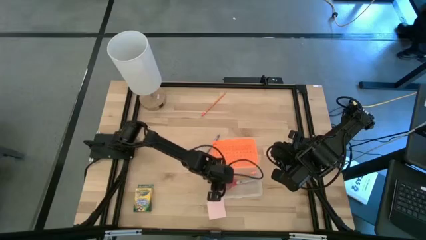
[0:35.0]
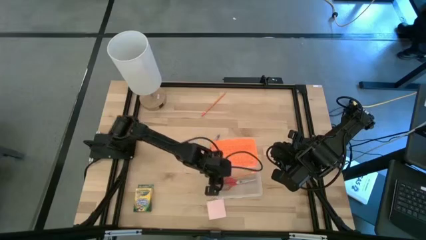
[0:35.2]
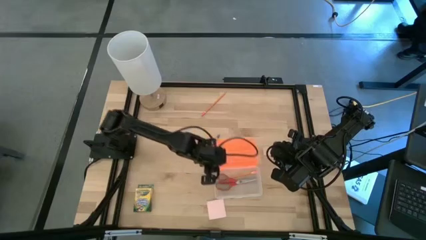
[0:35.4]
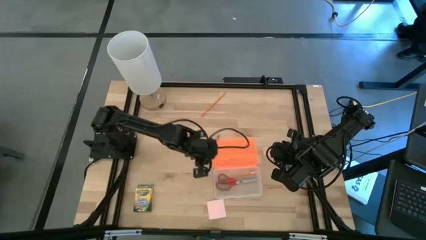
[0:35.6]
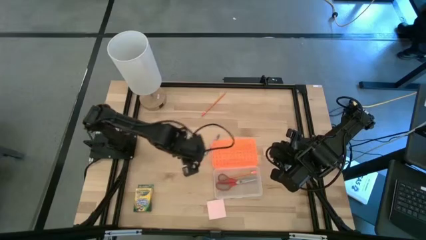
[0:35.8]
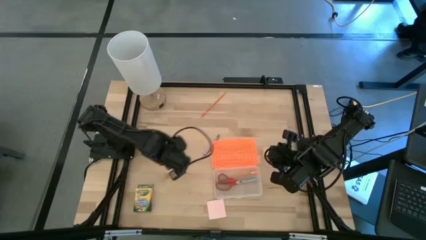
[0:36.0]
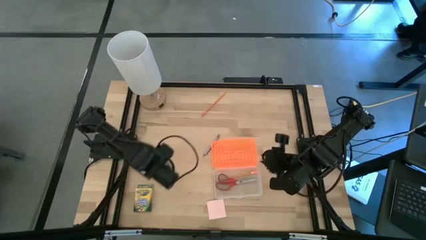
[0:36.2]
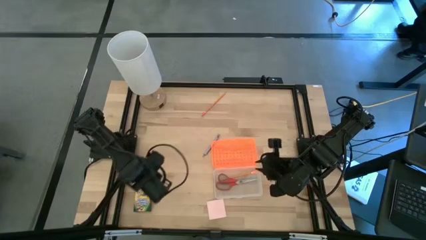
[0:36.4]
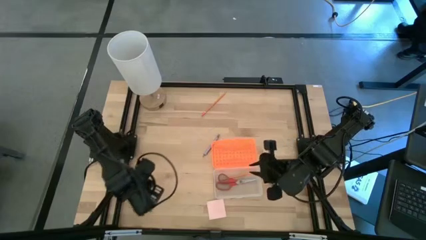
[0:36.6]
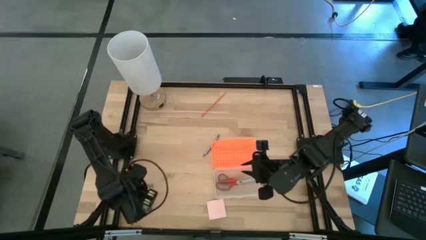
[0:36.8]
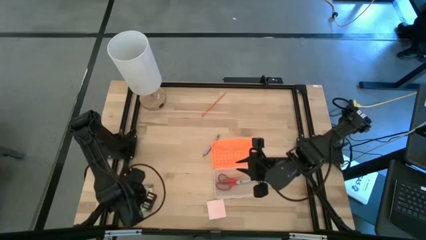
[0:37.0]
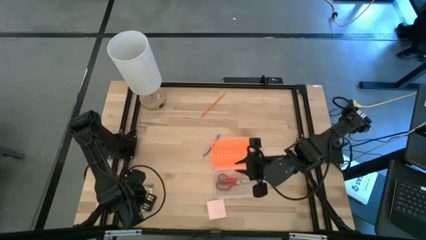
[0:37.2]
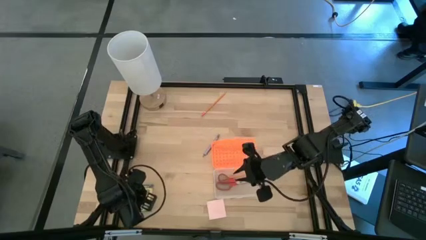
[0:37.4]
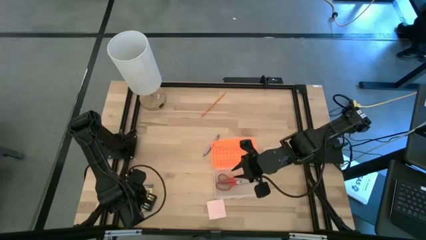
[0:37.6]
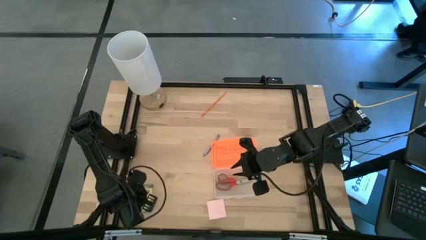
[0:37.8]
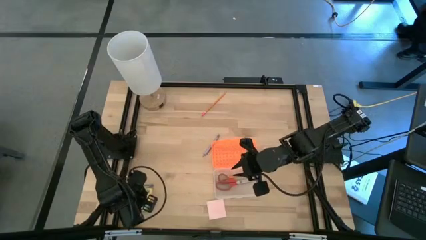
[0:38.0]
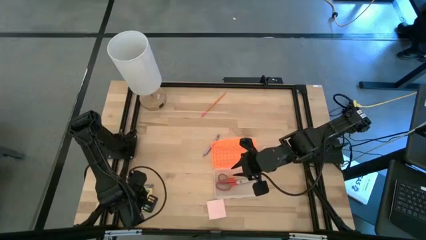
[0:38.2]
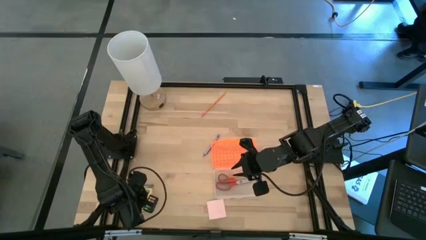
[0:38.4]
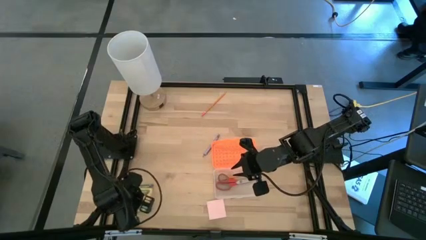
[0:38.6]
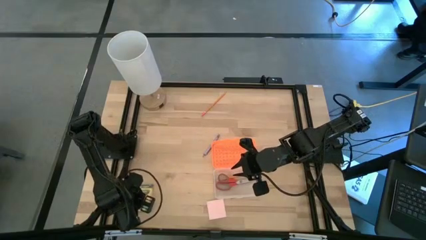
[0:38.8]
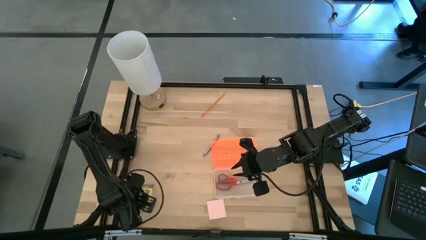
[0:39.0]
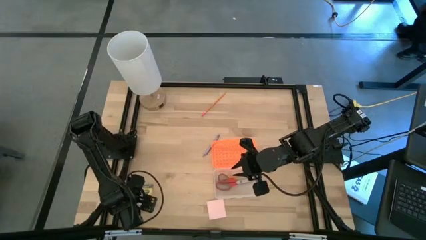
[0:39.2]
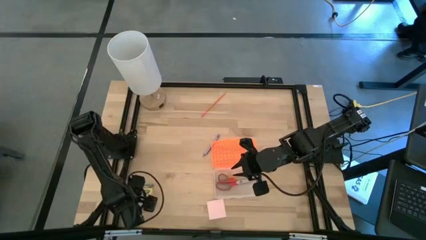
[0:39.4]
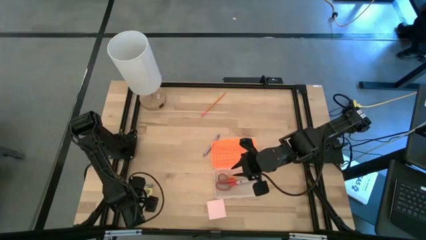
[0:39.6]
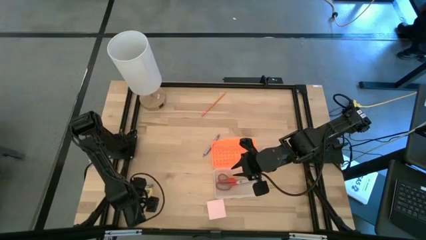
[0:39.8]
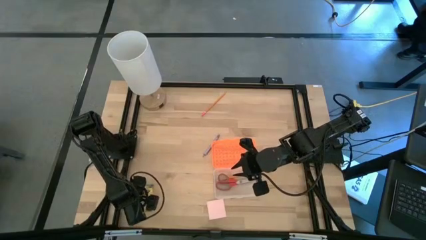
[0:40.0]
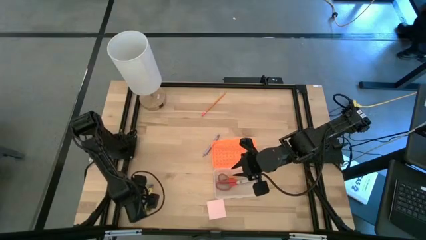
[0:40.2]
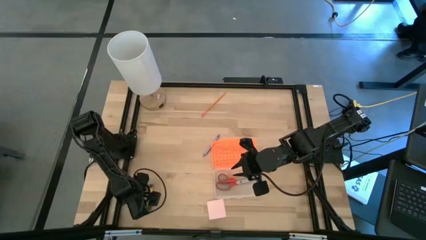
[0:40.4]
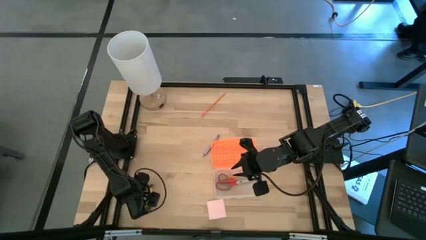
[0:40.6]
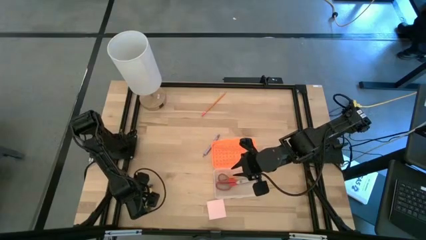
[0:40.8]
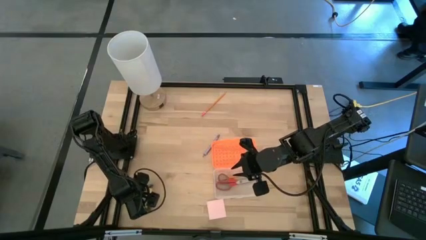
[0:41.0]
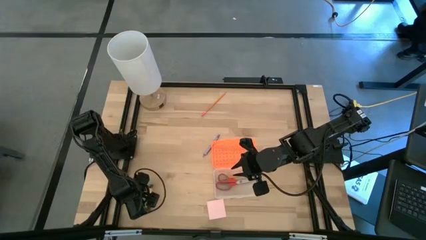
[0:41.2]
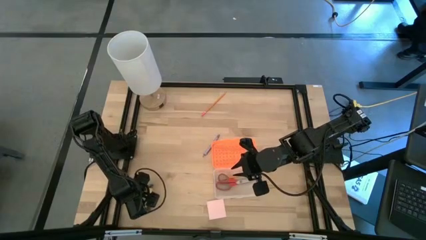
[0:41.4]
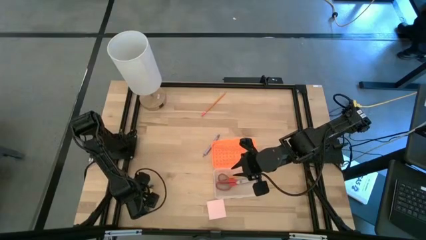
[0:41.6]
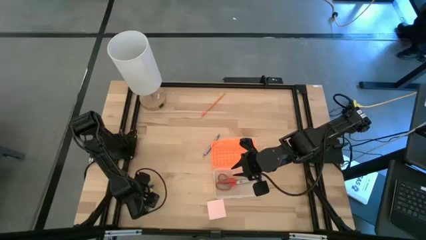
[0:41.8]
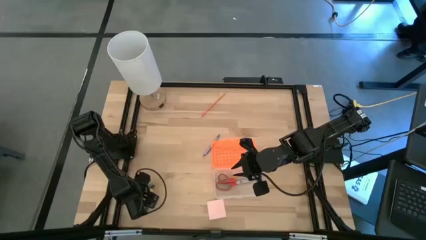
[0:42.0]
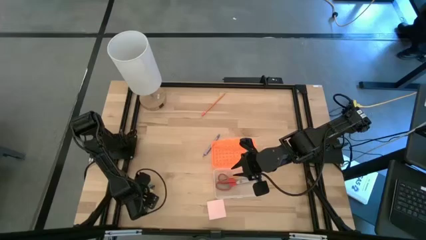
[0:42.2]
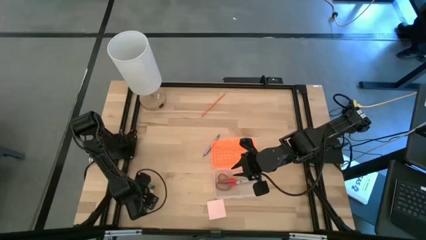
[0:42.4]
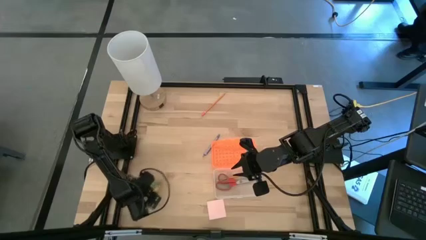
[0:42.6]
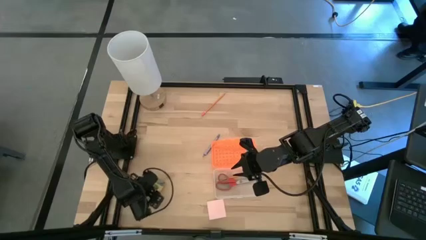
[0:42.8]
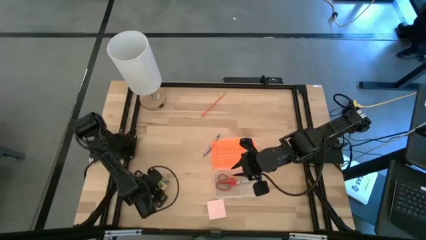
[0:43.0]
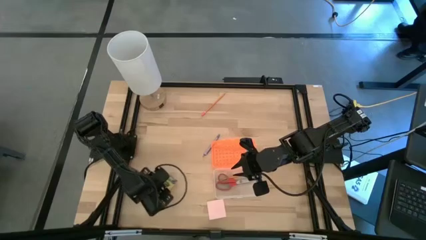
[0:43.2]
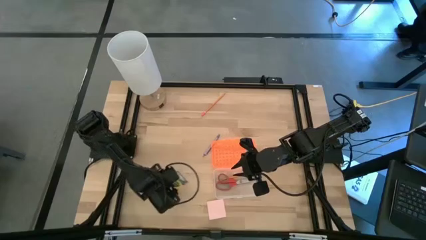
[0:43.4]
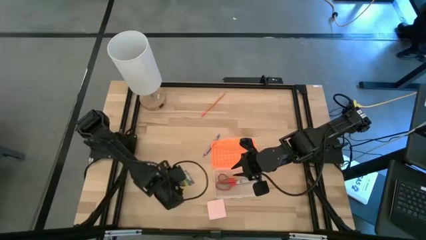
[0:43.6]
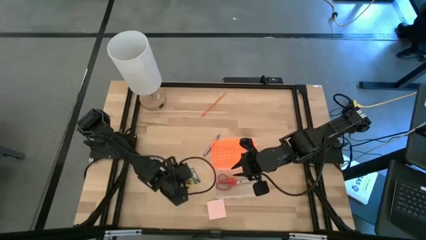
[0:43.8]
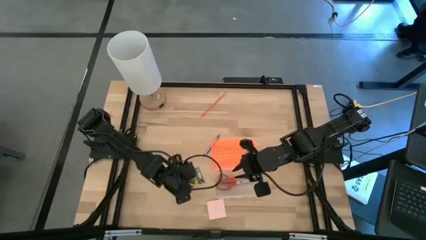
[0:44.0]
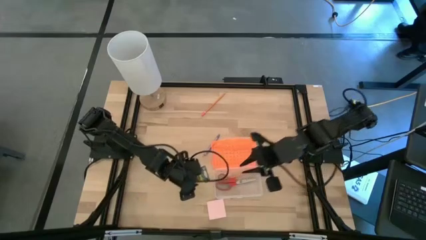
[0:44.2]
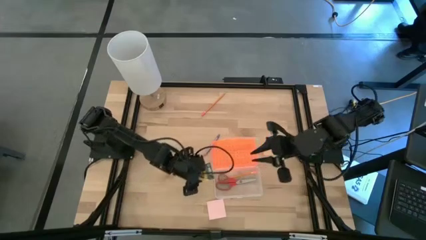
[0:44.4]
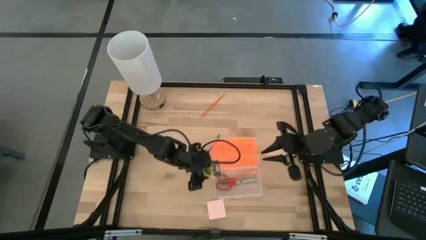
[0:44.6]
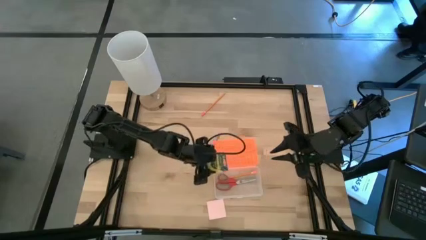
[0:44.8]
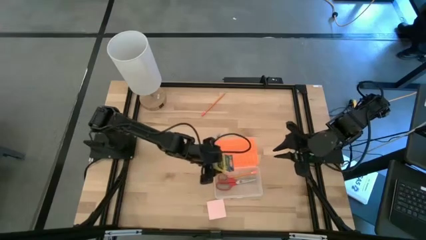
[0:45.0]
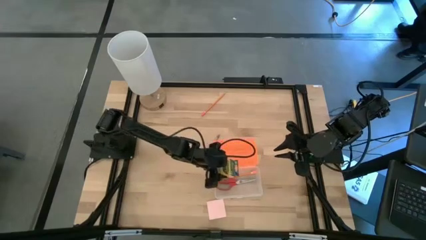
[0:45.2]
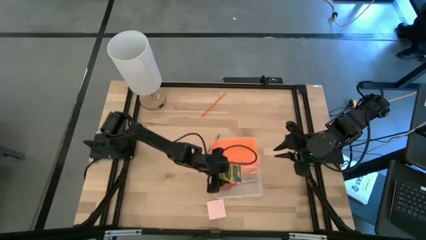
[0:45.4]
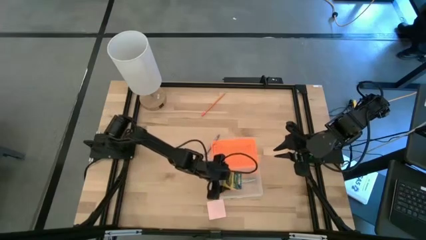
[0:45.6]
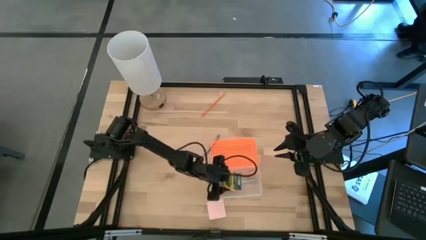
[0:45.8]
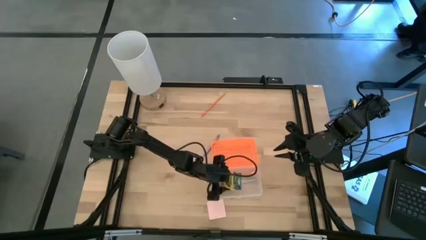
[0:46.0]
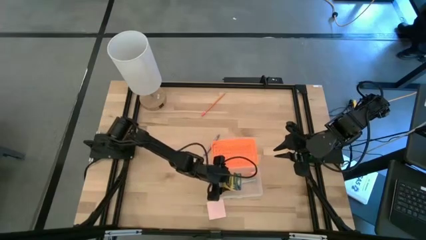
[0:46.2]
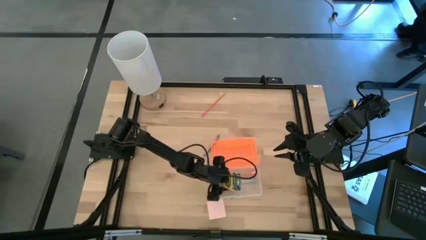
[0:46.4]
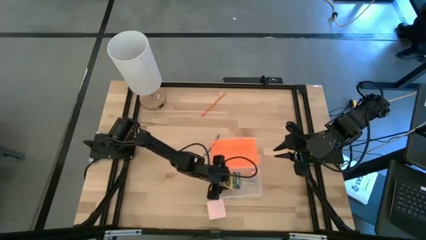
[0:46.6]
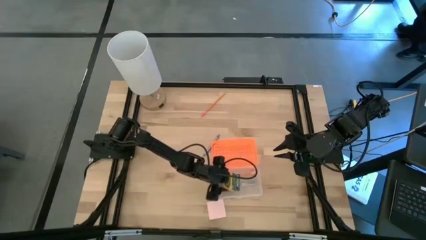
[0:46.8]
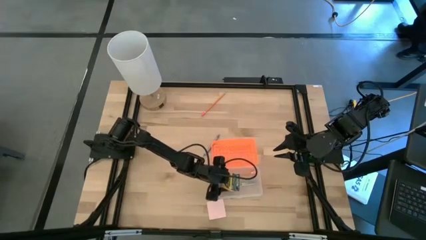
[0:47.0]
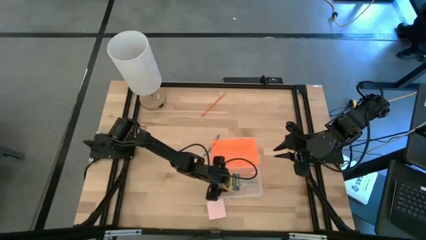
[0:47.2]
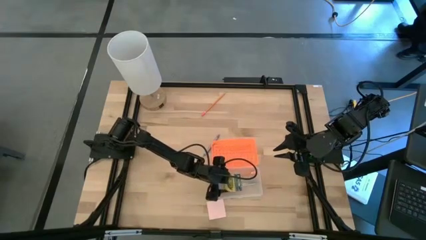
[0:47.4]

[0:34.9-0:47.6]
Task: Pack school essentials
Put the yellow box of crayons into the orange supply box

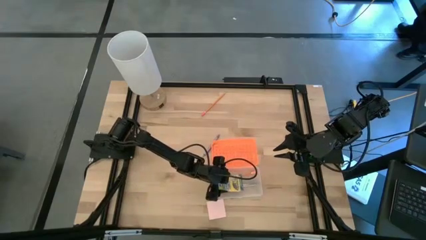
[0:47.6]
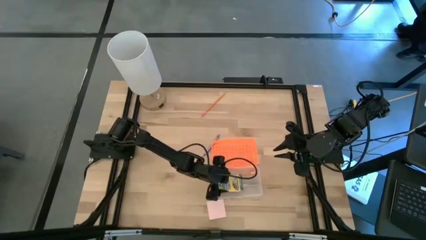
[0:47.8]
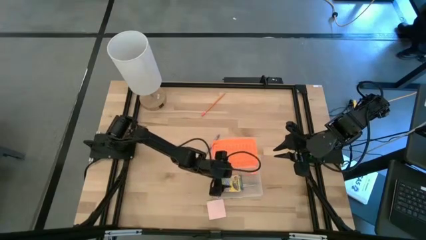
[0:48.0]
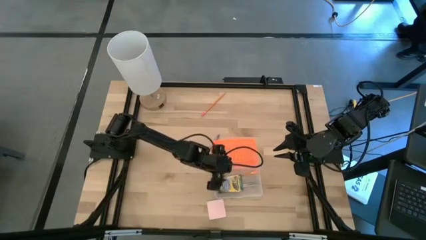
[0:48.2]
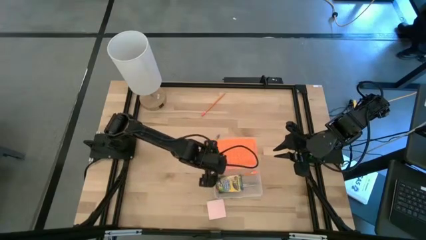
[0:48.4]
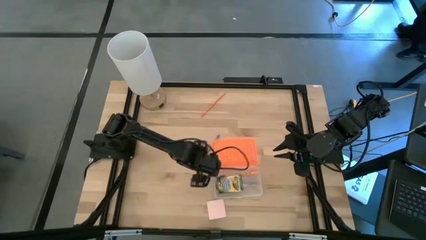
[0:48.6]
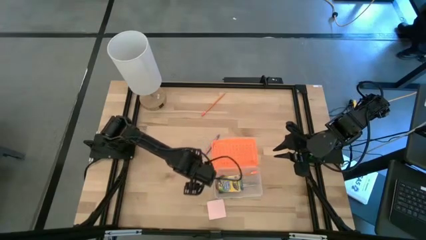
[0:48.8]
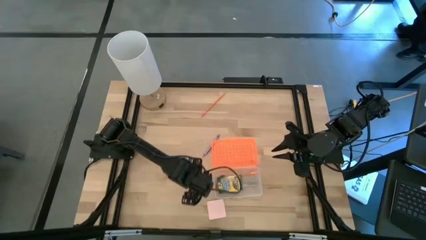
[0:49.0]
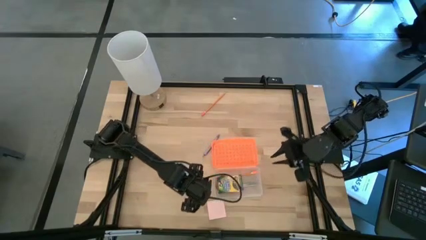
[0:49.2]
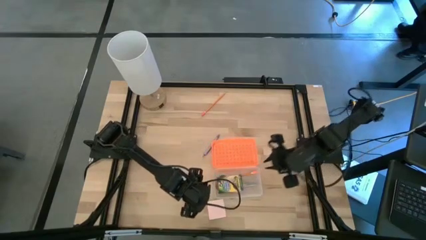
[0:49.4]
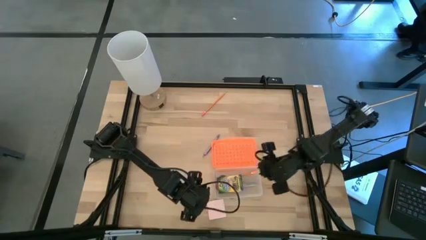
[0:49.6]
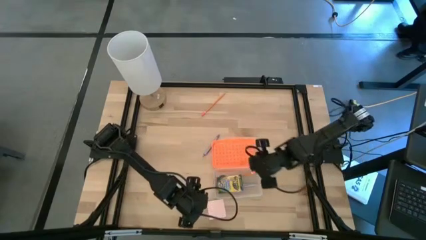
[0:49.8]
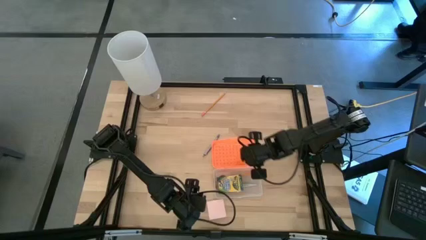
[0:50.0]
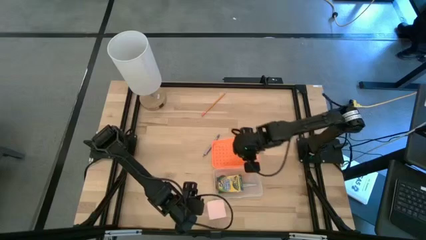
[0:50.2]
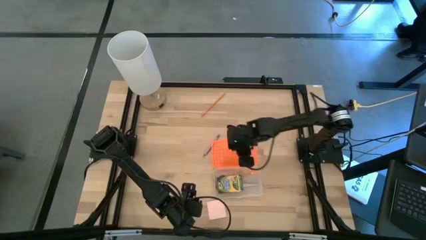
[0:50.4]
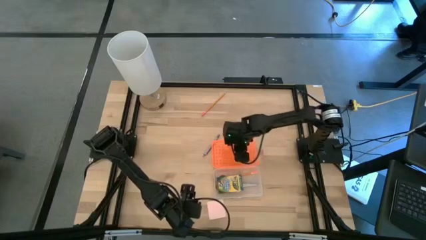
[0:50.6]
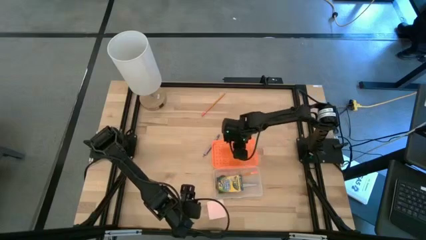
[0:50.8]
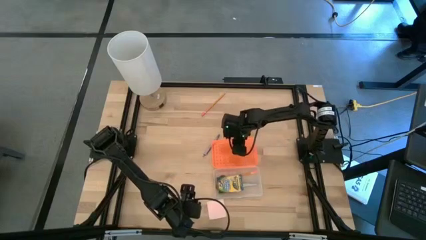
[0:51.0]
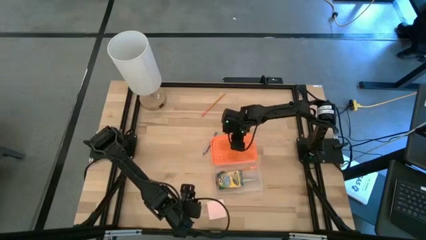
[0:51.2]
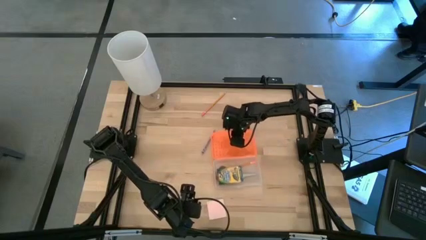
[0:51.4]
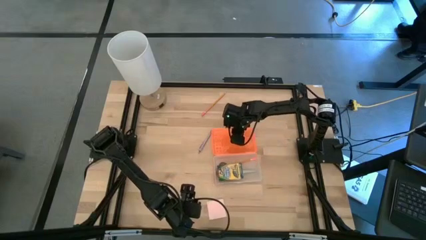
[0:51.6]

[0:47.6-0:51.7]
Adjust the orange supply box
